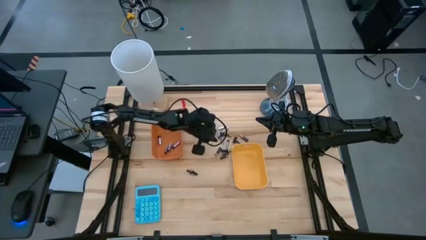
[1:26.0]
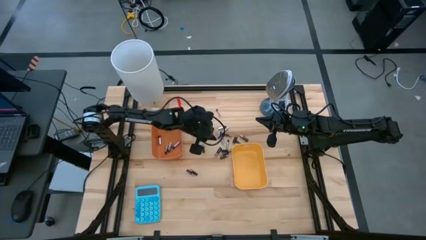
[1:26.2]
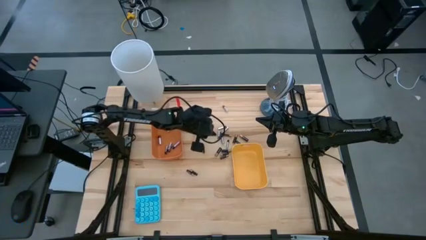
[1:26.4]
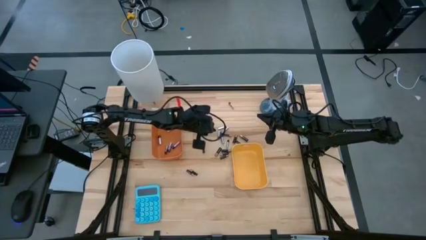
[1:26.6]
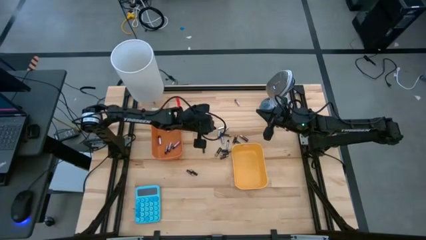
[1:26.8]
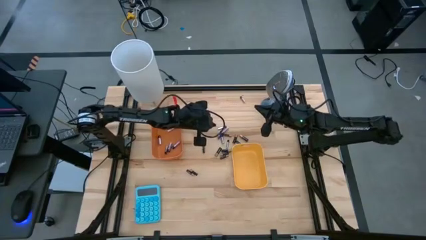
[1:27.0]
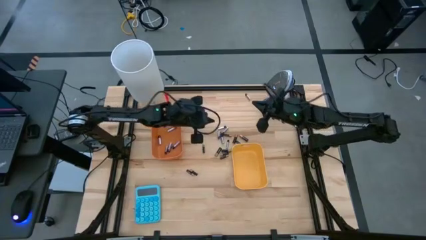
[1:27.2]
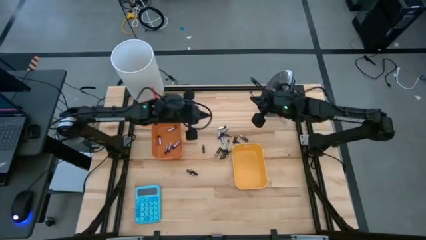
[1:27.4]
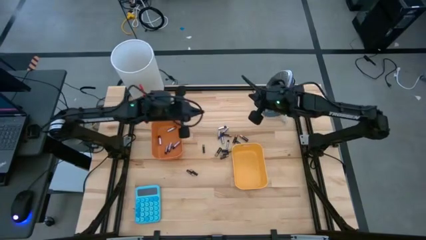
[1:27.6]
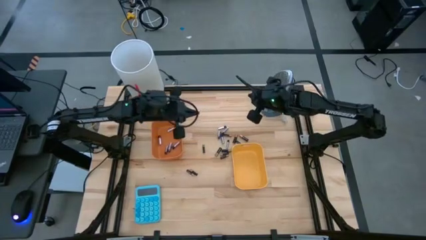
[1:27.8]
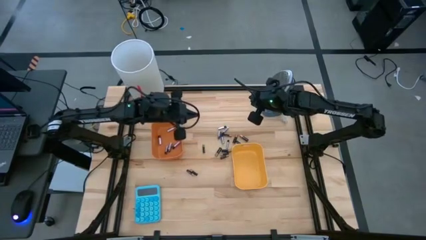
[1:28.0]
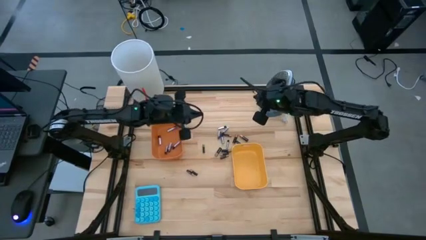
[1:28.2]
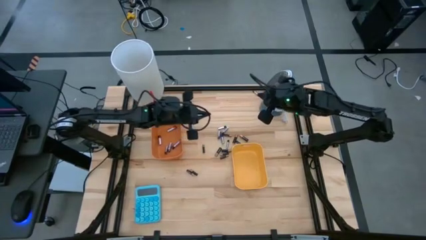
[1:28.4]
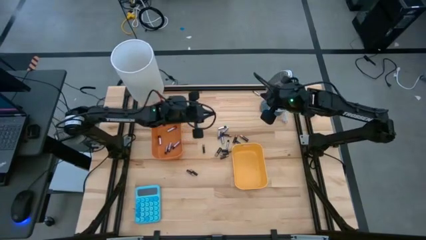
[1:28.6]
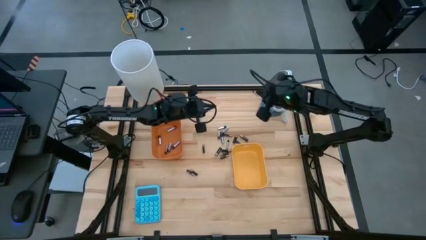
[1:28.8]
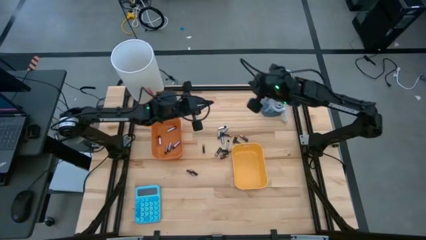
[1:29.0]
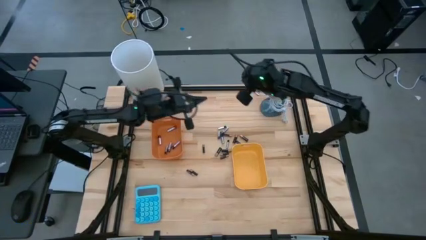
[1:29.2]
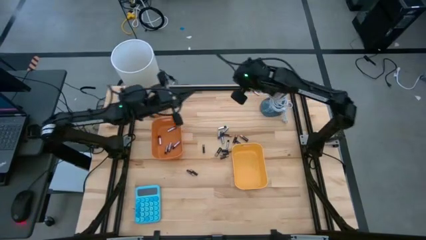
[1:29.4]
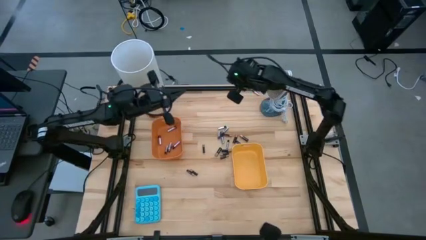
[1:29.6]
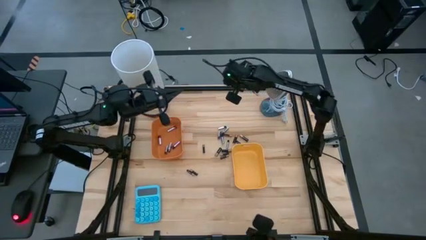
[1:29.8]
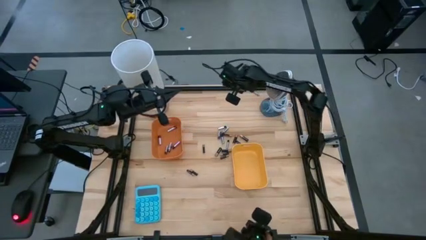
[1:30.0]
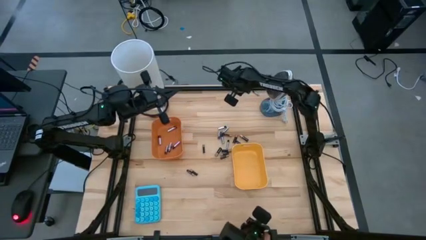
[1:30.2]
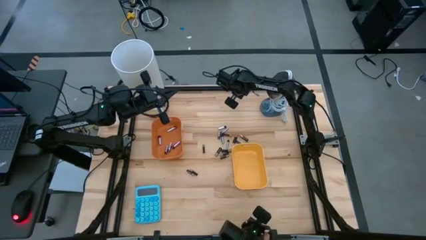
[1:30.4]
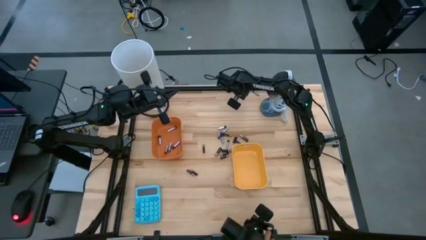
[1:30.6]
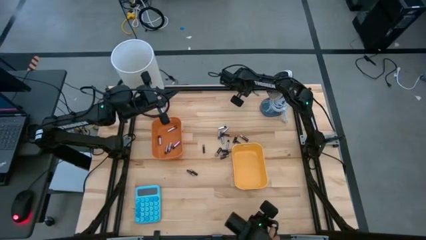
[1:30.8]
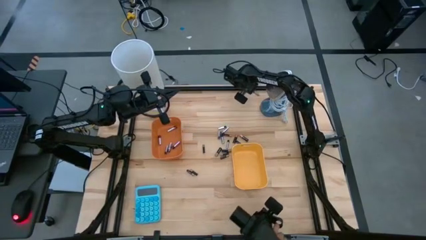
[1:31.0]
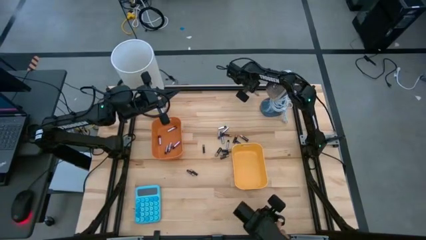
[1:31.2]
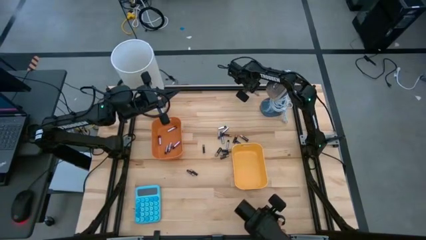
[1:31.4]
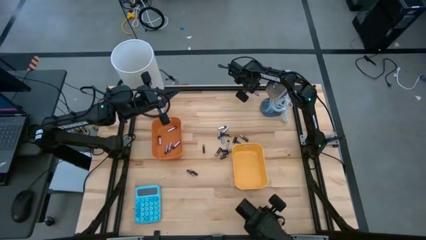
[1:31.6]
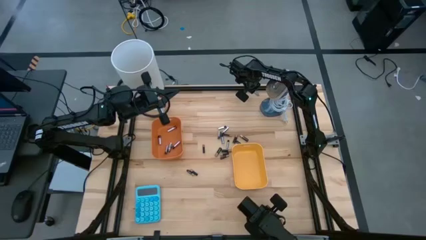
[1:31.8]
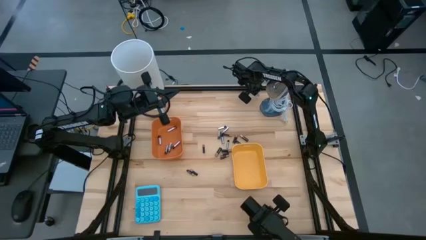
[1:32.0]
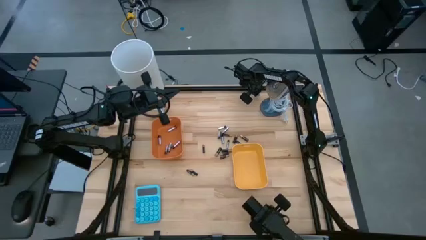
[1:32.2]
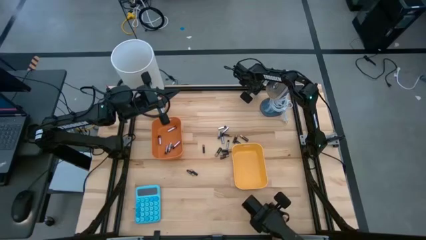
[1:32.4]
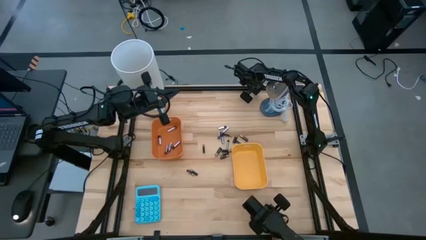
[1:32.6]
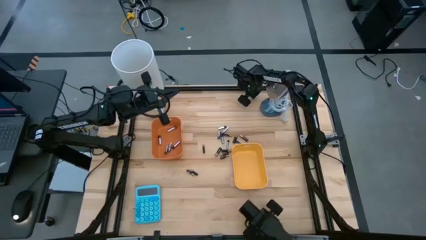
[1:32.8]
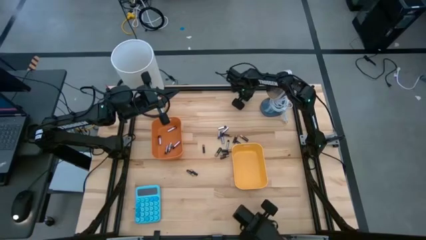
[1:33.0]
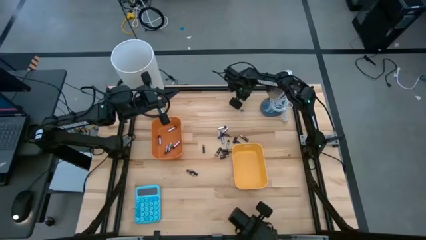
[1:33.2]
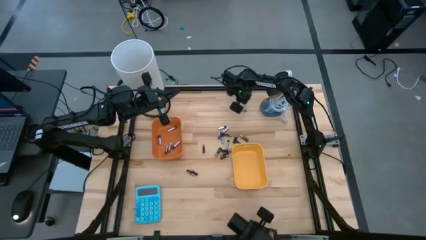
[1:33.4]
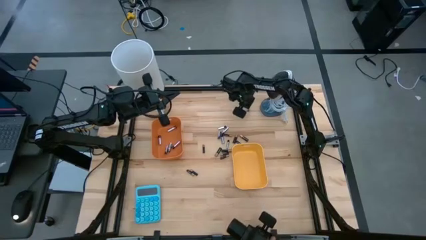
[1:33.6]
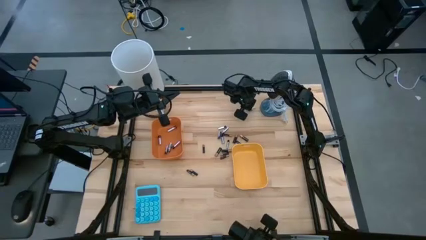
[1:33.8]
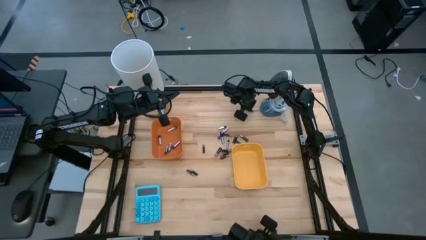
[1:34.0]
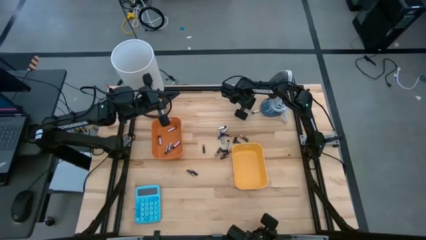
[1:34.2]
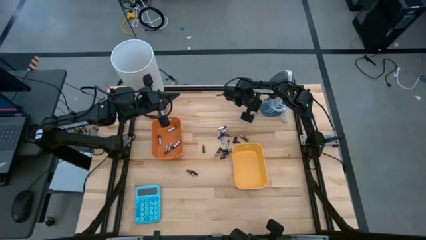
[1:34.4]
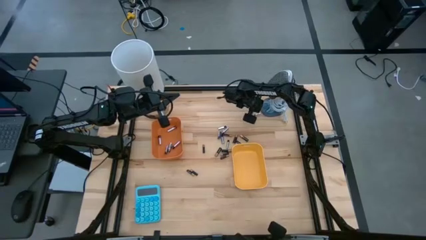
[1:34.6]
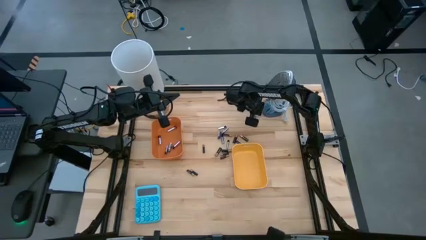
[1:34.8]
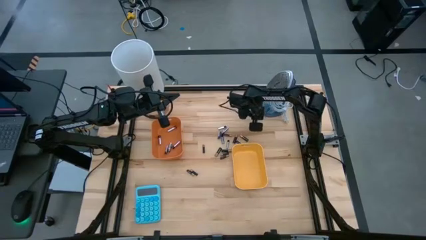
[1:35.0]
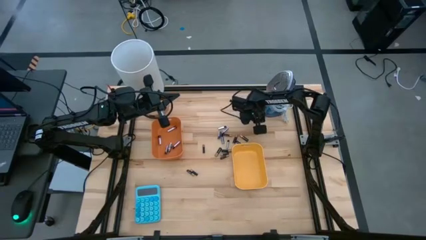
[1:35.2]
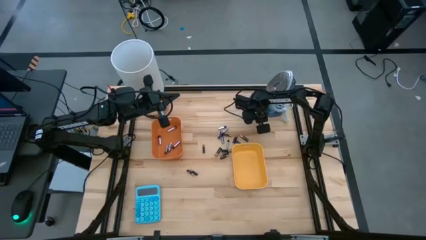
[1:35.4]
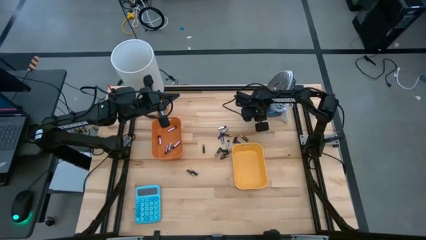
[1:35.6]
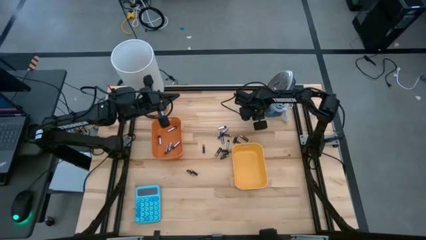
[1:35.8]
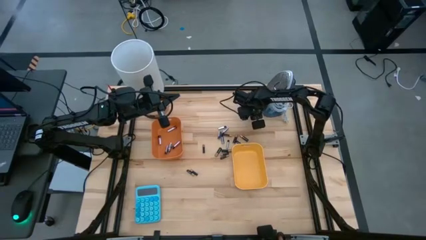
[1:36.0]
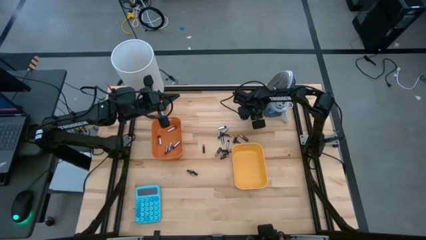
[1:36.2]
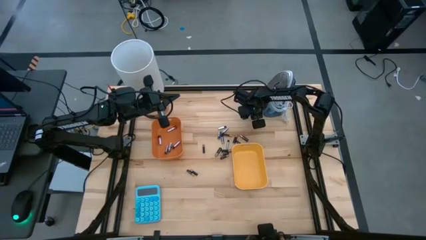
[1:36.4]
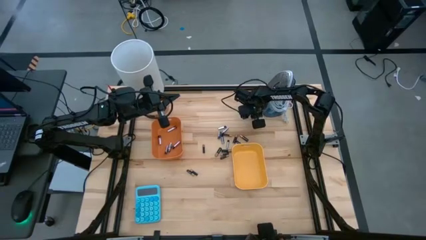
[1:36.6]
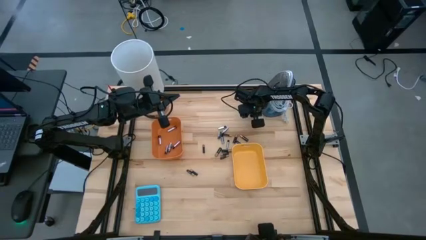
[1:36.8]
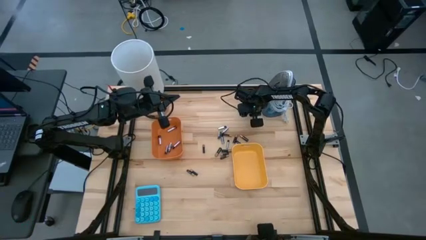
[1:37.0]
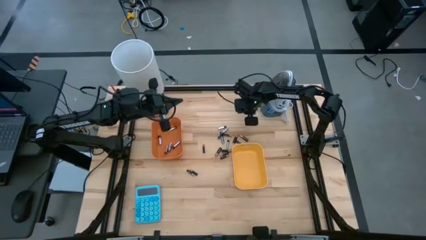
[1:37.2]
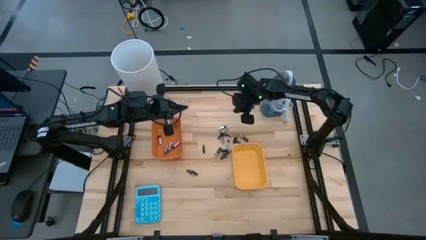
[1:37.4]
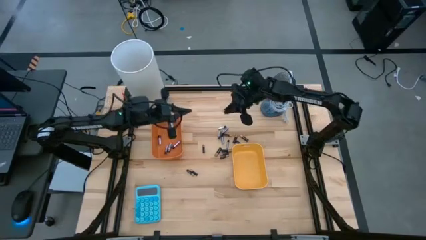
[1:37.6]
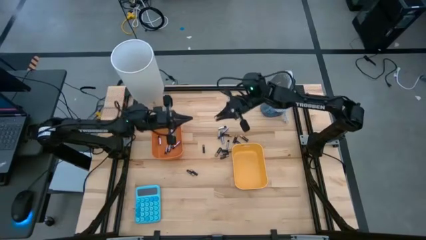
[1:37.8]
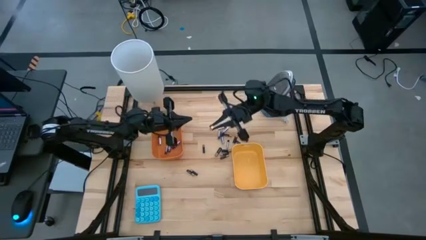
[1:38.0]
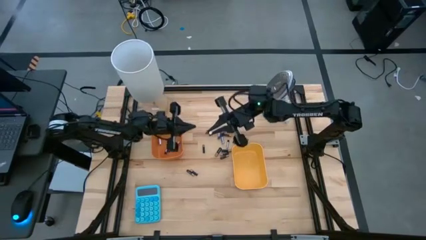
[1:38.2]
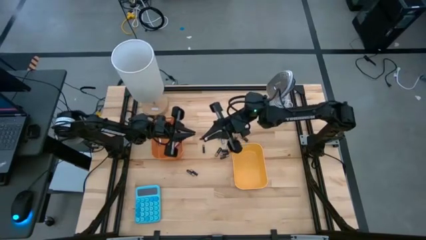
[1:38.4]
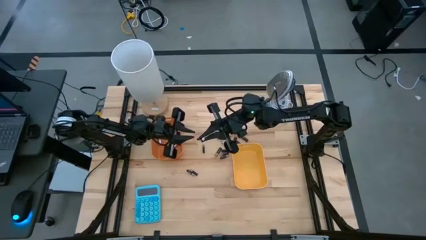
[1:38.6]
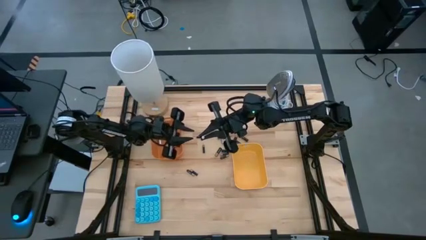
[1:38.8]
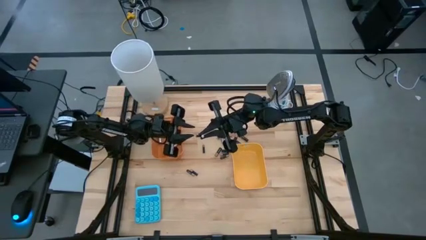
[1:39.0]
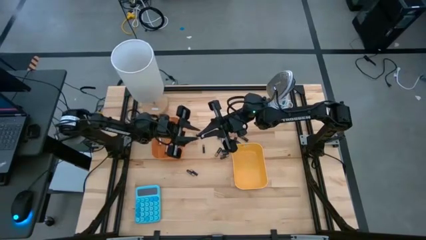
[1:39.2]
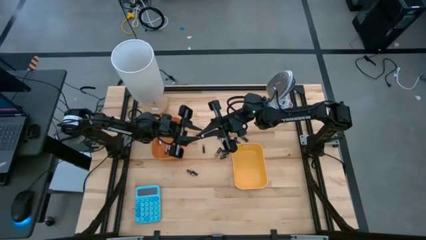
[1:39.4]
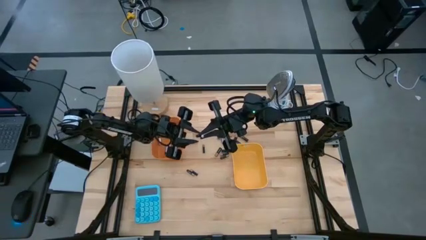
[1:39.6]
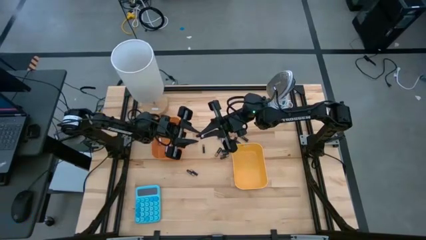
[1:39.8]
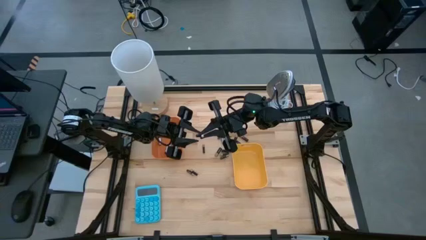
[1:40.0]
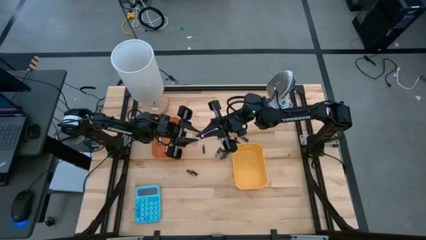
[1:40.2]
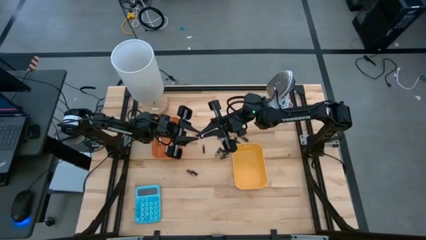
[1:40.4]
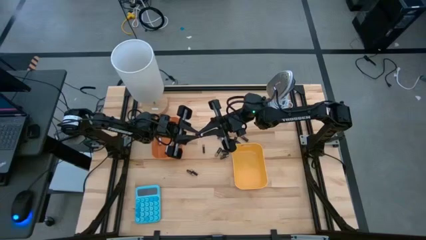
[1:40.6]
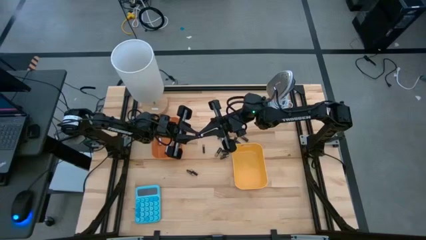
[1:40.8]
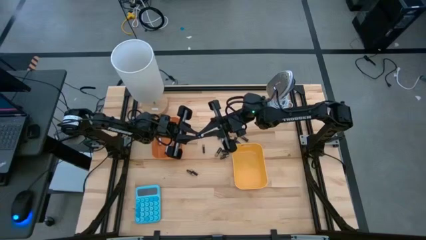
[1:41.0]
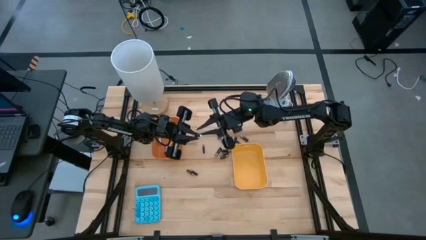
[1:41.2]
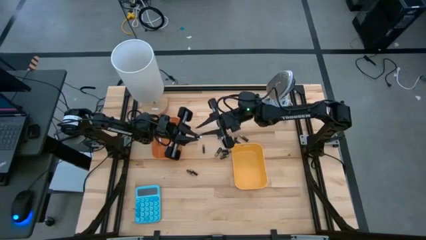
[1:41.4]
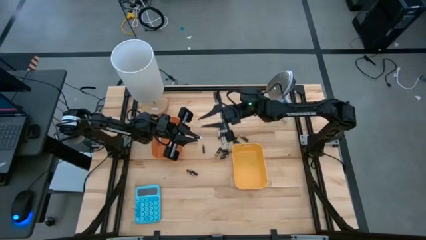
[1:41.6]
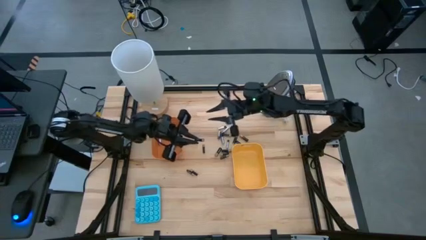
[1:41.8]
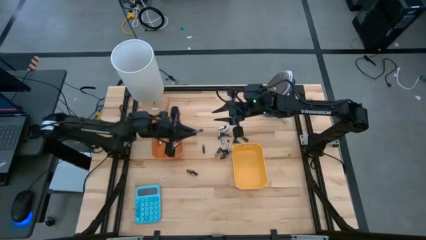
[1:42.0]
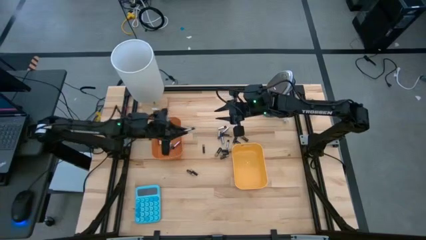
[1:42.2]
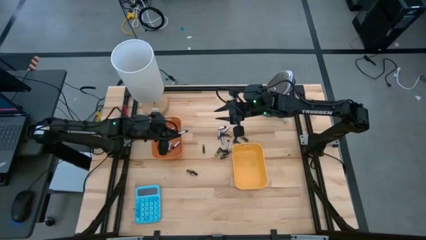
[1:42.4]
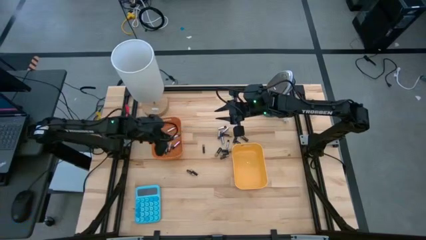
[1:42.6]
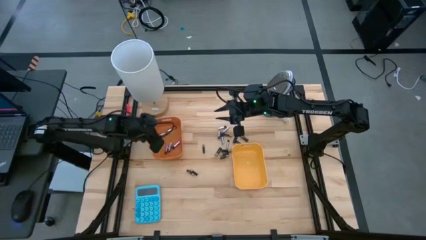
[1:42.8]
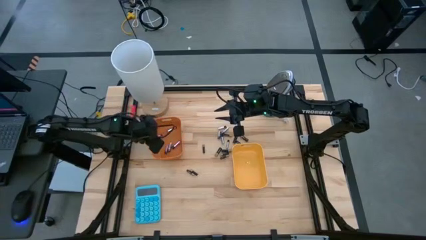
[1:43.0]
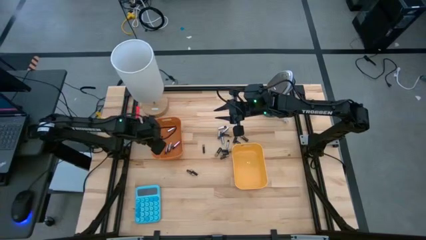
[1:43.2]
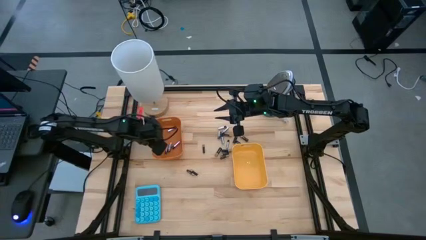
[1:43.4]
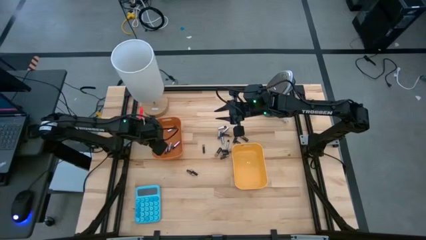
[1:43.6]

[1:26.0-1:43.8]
Task: Sort batteries
Put the silver battery into the orange bin
